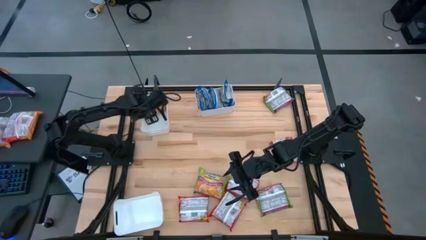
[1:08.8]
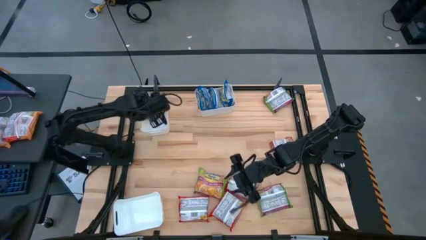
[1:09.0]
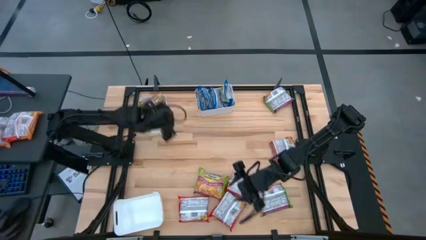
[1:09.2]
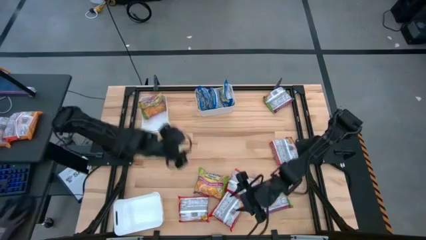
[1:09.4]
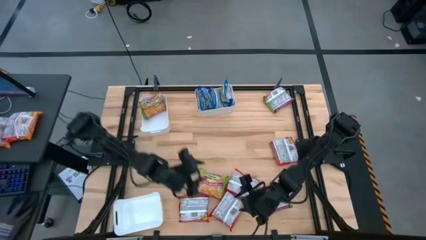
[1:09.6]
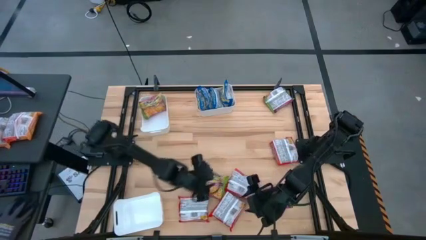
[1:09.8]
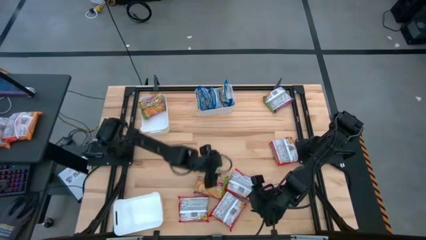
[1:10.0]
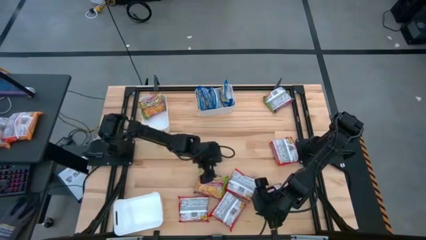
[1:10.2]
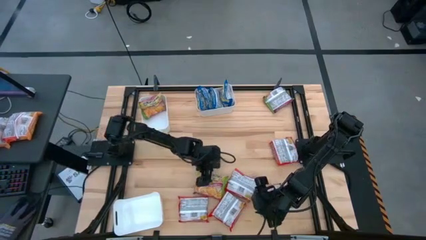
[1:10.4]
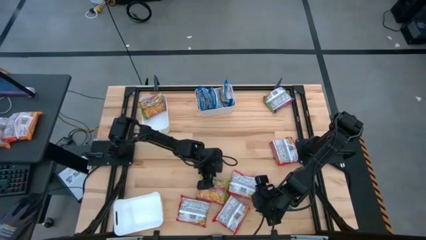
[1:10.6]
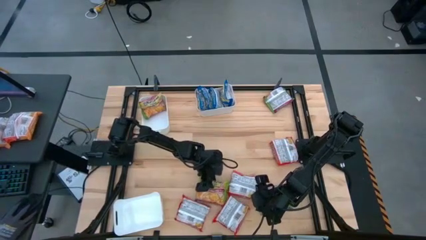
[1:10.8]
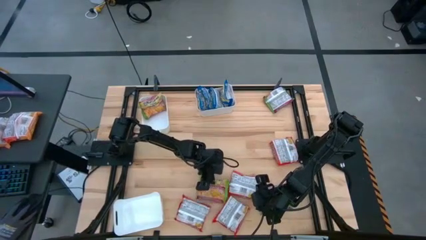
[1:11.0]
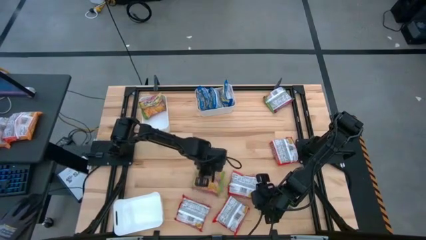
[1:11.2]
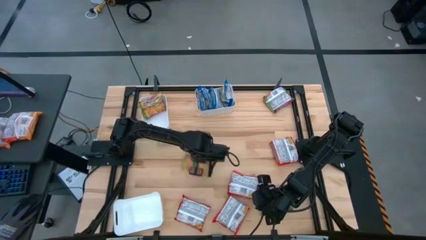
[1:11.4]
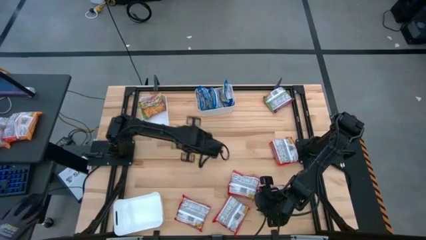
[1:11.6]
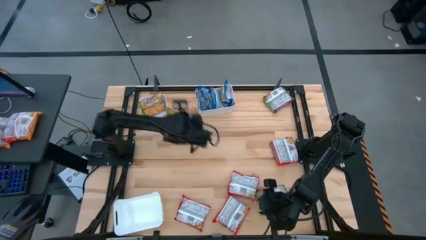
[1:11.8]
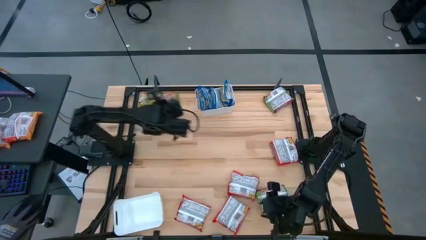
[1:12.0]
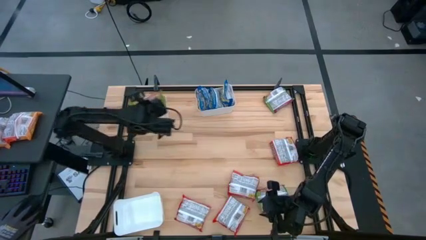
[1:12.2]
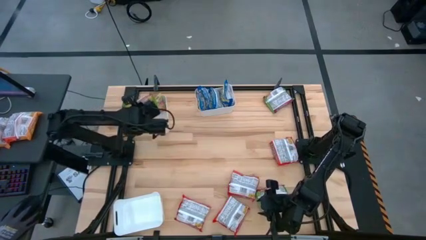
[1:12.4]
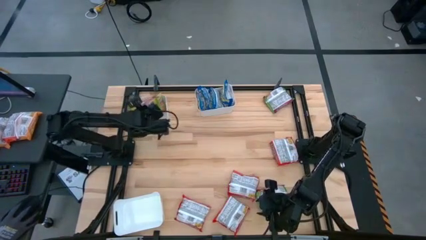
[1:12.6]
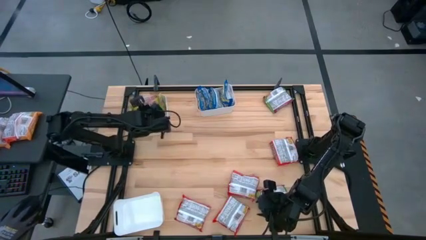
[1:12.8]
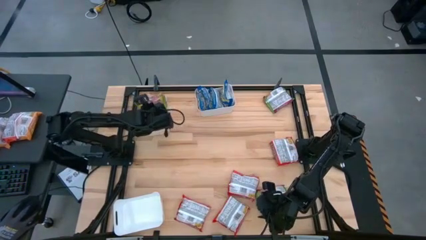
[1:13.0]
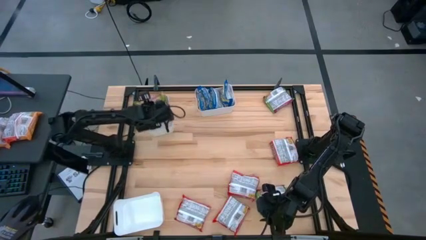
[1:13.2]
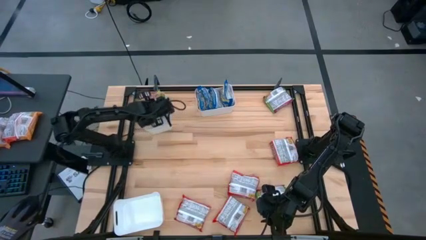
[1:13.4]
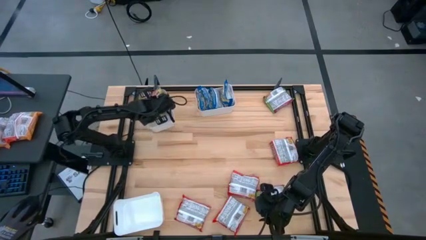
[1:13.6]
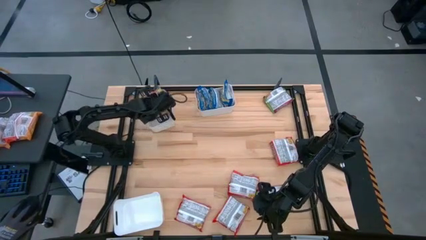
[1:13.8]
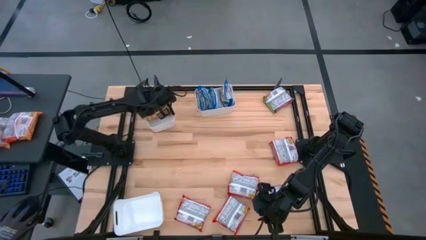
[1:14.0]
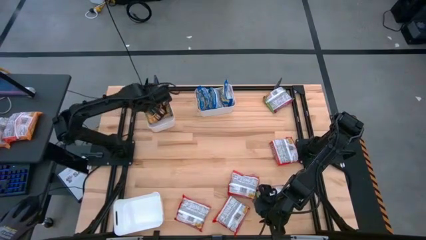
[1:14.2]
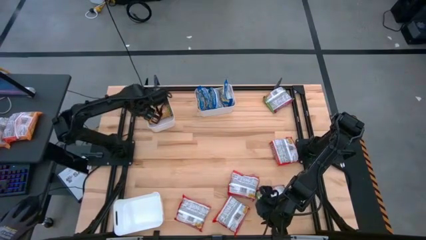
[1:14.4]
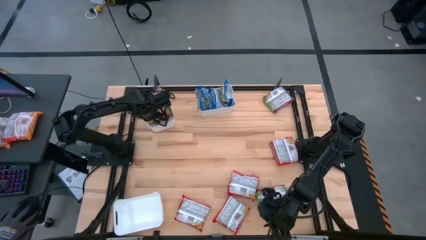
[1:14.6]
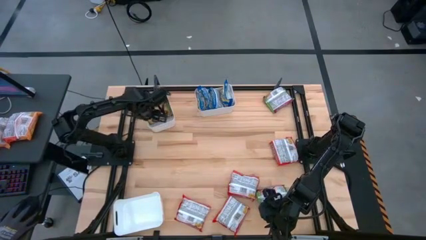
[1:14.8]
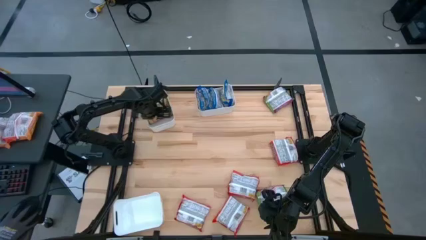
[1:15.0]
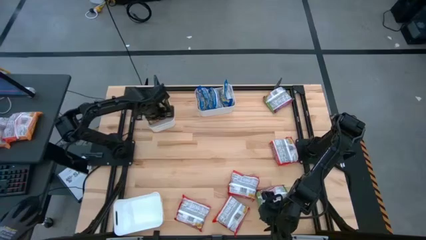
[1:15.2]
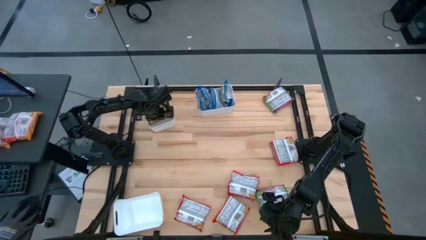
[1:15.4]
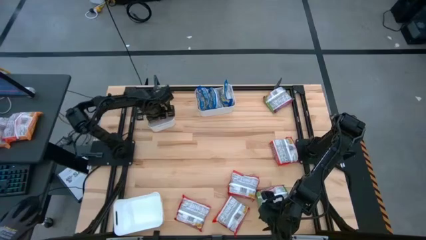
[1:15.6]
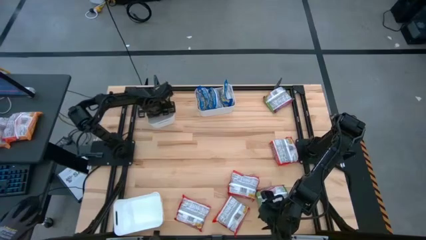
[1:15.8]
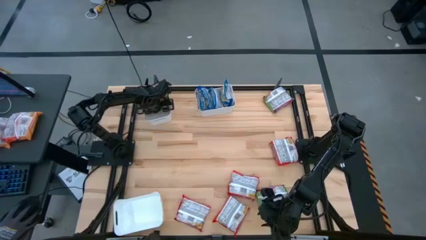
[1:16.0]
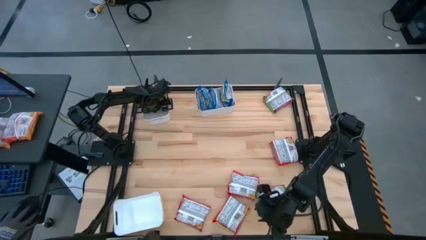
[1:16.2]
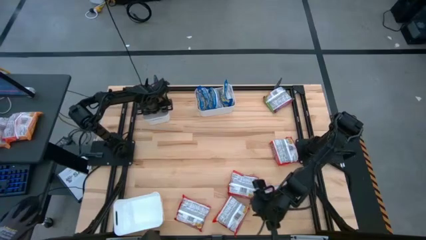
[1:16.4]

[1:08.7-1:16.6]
Task: Sort Maruchan noodles
Put the green noodle pack into the middle white bin

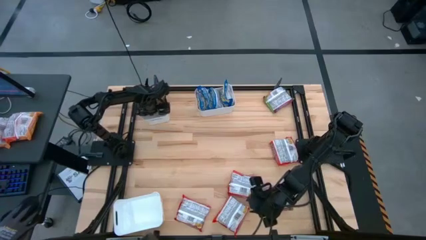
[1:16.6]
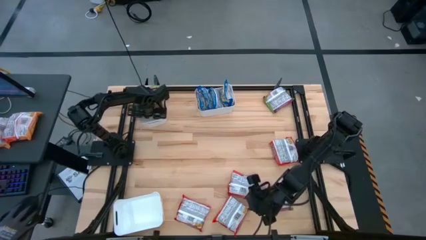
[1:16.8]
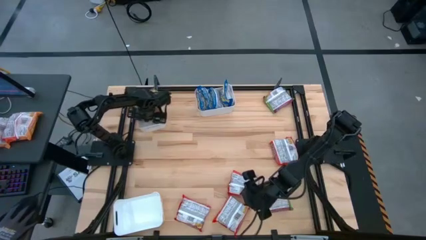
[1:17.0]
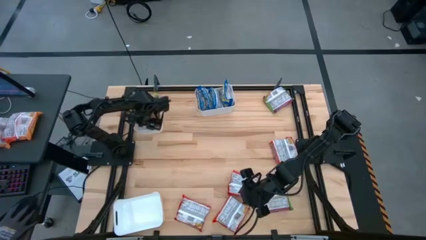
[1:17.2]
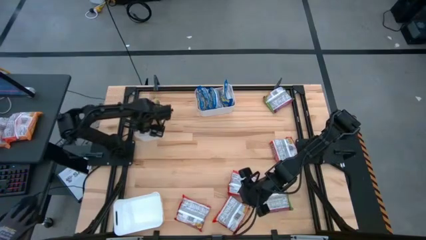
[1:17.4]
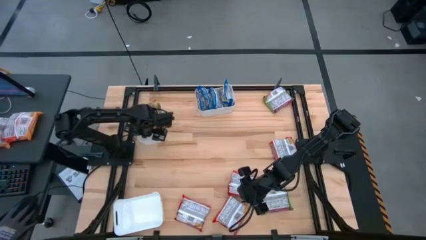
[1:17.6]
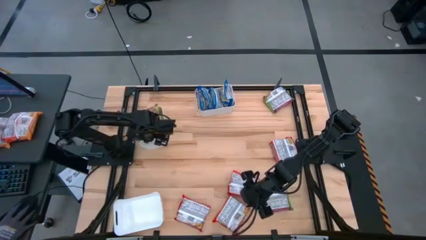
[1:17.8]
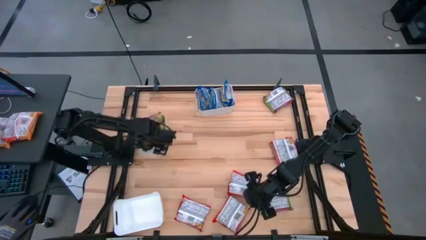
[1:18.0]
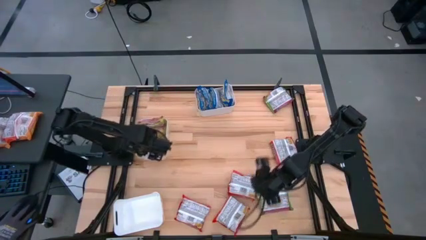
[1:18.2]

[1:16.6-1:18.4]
Adjust the middle white bin

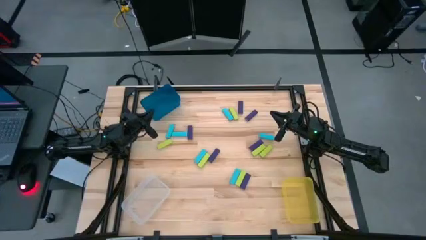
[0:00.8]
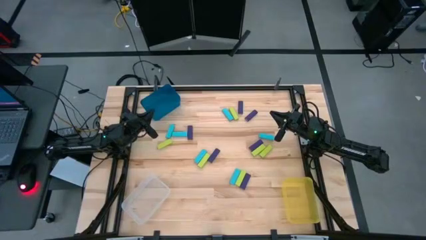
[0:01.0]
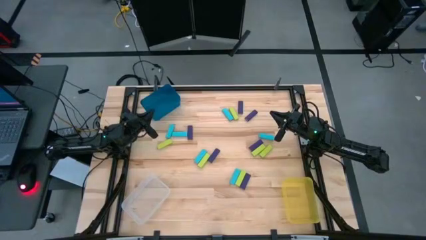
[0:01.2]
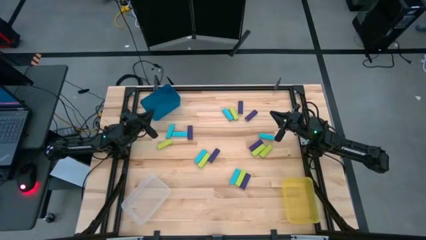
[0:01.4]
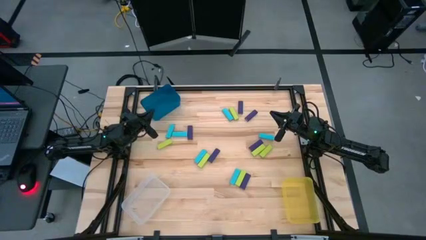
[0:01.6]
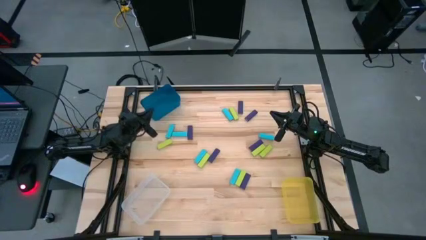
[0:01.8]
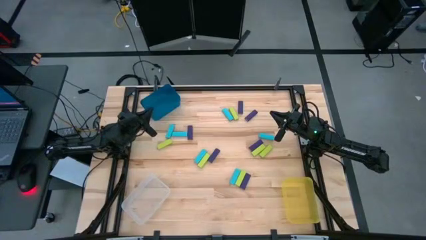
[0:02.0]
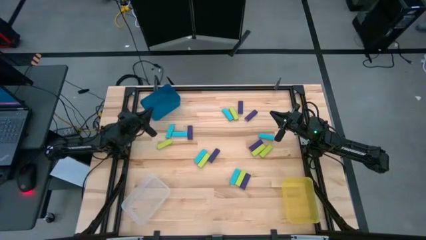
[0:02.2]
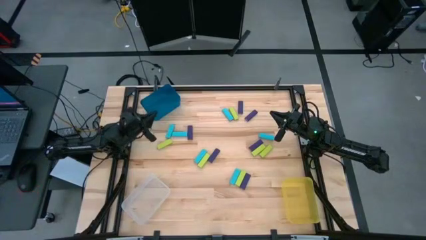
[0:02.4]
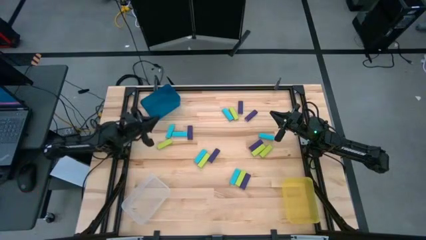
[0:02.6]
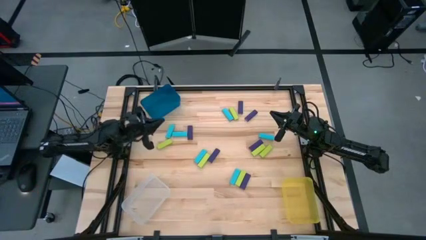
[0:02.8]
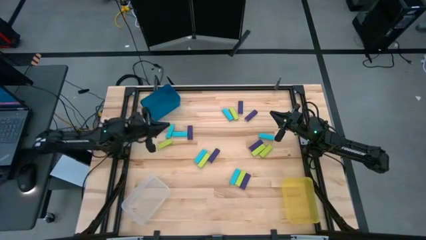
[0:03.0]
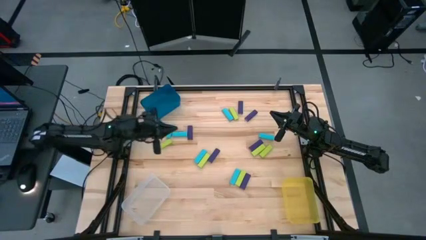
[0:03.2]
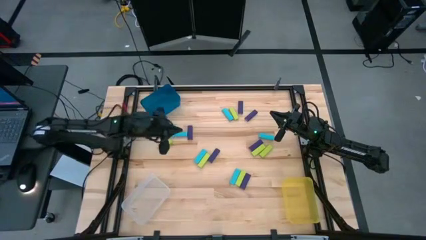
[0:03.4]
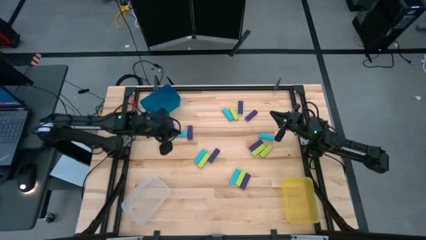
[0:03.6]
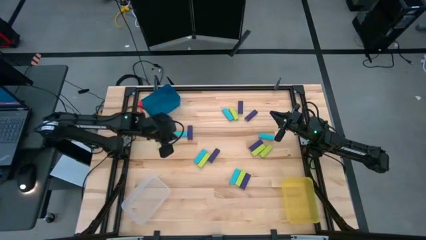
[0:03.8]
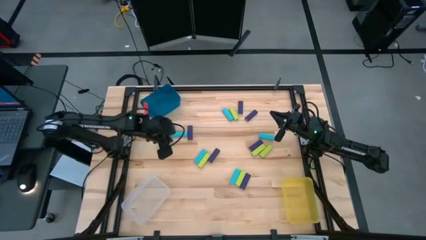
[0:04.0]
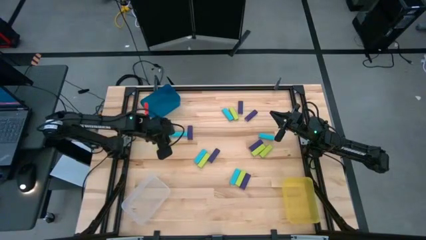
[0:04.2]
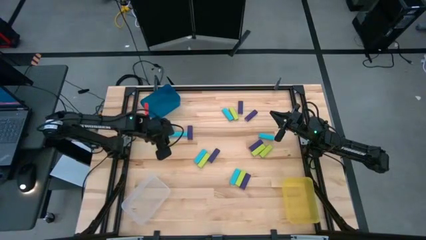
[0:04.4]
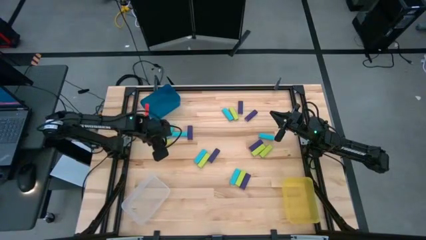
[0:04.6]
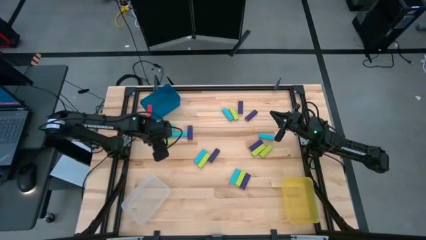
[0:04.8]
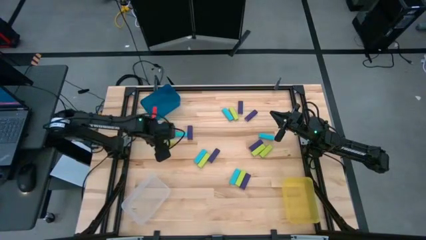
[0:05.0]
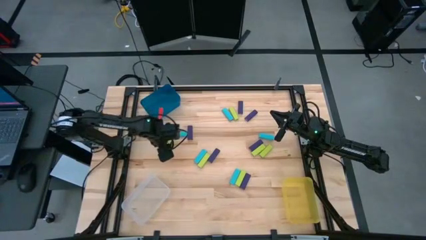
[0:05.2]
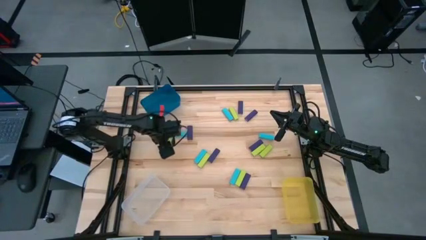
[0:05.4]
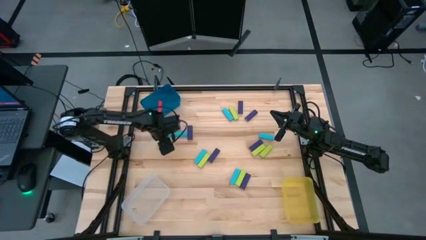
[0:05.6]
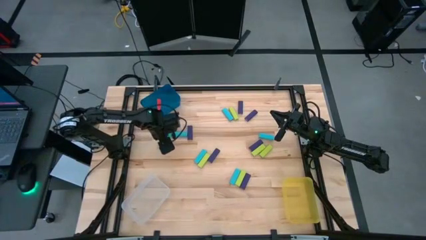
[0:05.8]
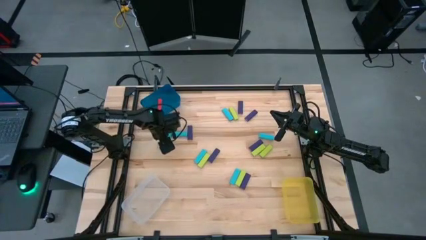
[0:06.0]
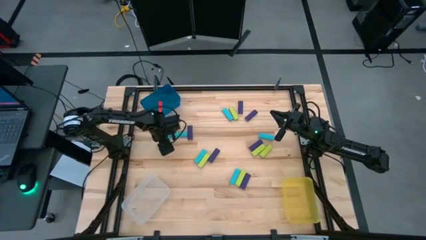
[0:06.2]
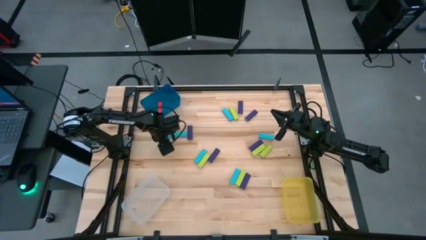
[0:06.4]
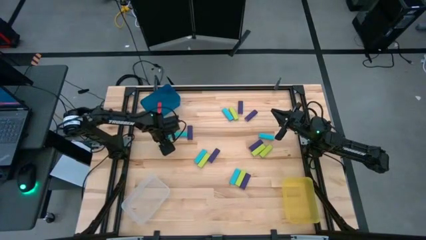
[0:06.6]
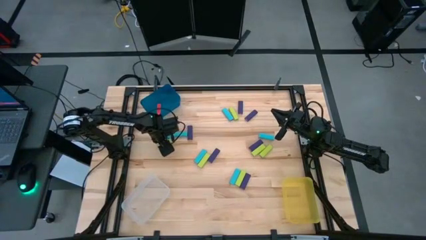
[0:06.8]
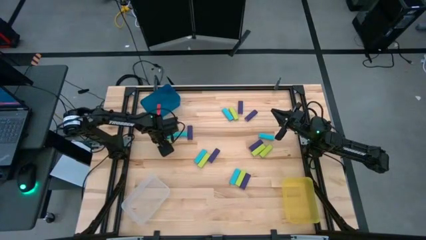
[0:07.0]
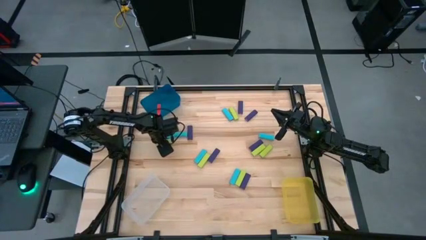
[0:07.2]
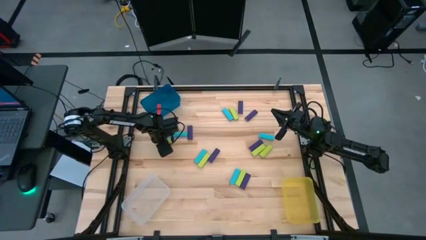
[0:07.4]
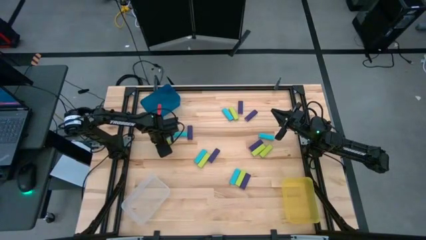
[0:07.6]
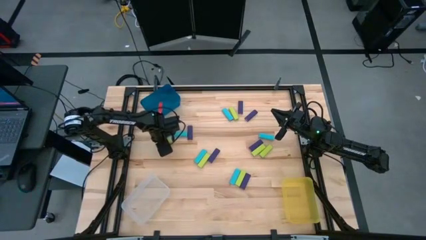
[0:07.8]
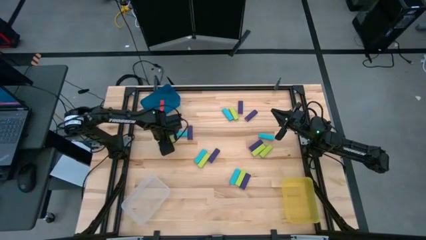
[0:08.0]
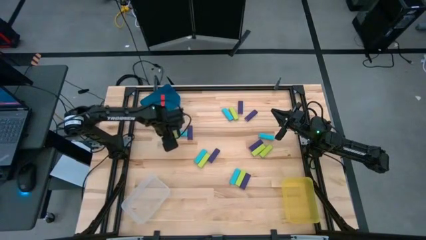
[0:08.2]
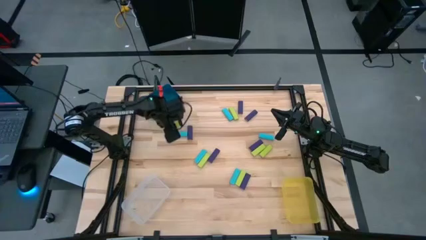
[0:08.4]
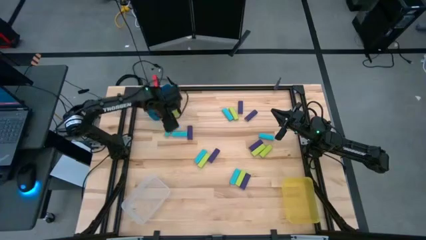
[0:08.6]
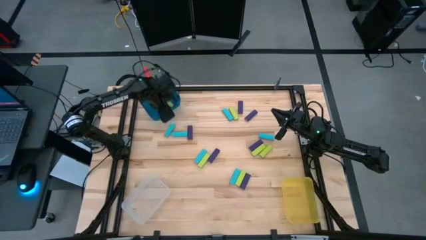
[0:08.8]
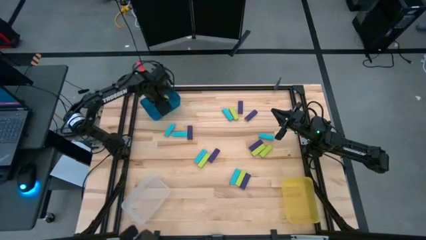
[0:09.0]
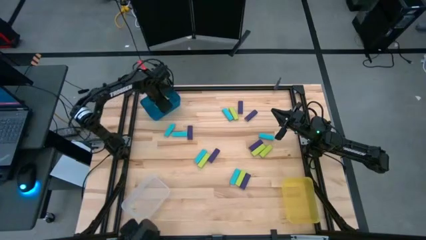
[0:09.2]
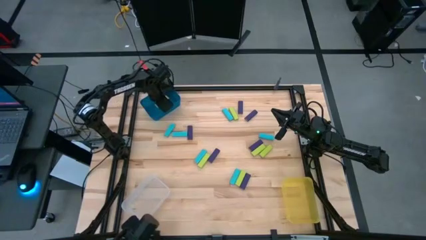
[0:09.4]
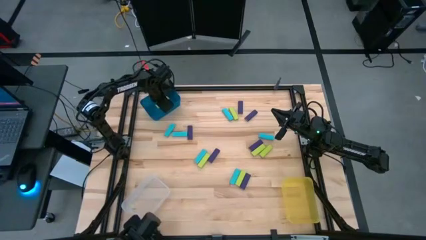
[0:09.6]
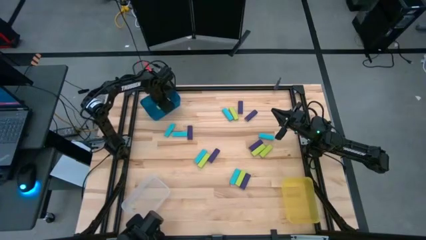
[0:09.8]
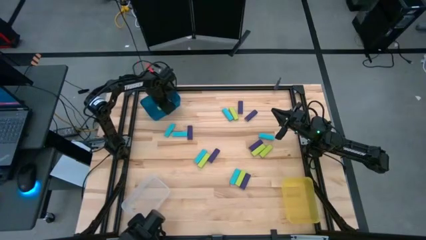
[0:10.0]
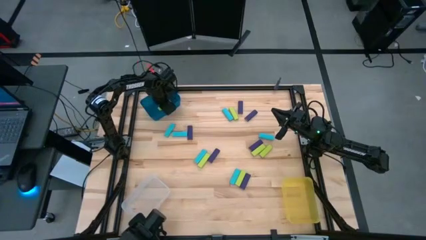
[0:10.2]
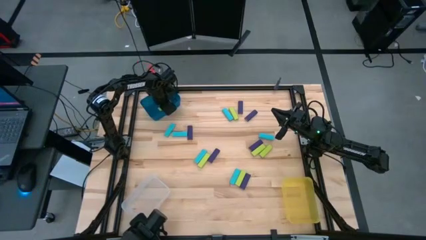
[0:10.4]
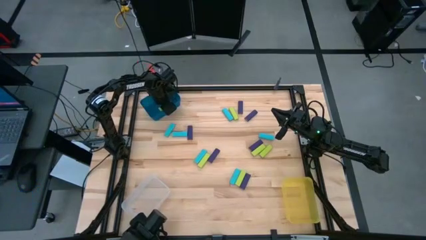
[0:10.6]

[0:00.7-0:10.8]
Task: Sort blocks
Put the green block into the blue bin
